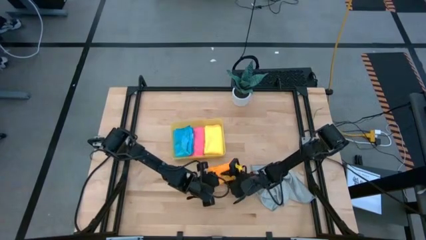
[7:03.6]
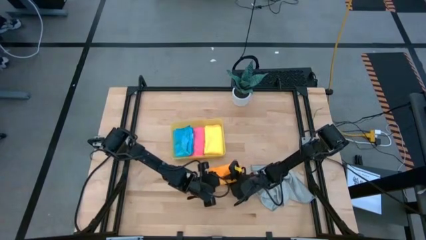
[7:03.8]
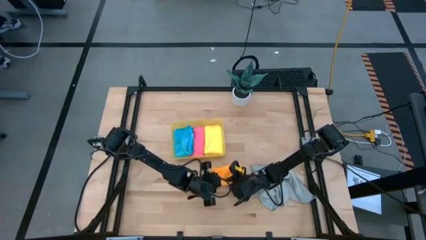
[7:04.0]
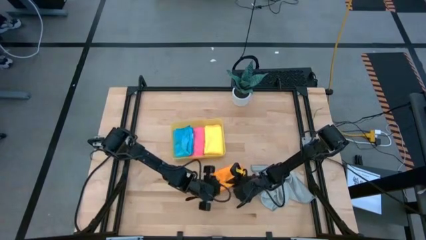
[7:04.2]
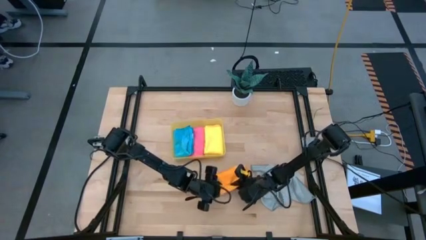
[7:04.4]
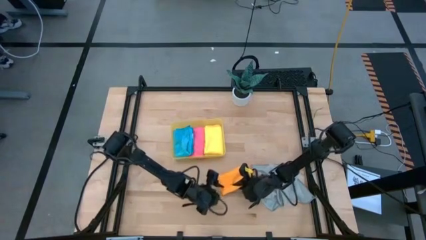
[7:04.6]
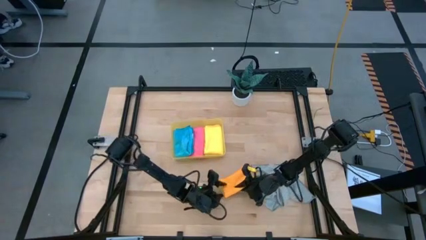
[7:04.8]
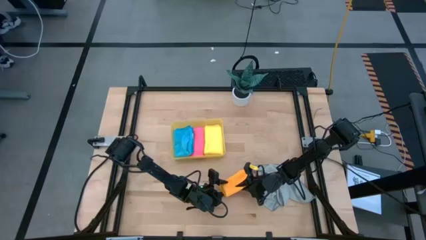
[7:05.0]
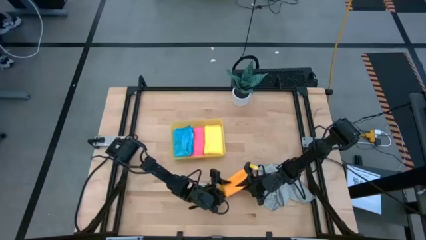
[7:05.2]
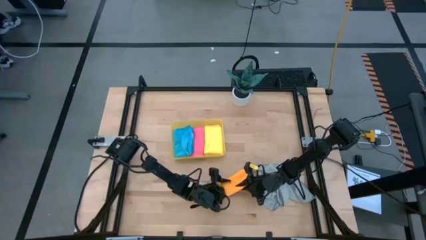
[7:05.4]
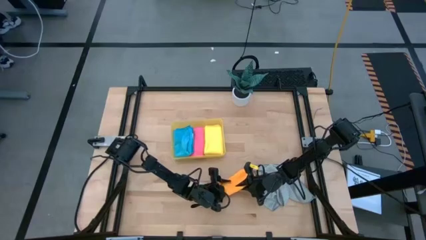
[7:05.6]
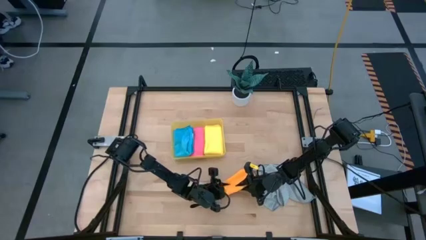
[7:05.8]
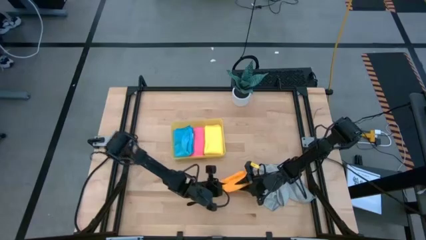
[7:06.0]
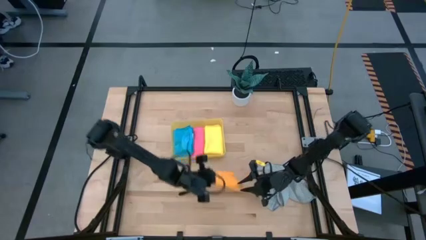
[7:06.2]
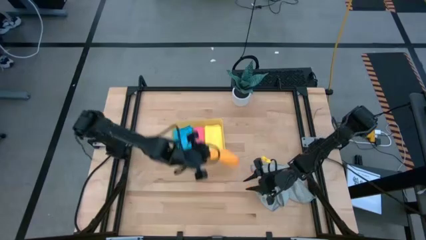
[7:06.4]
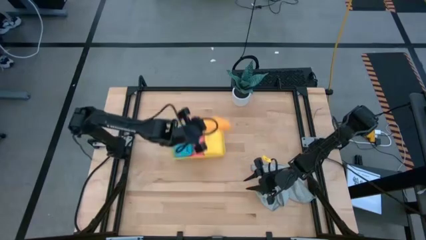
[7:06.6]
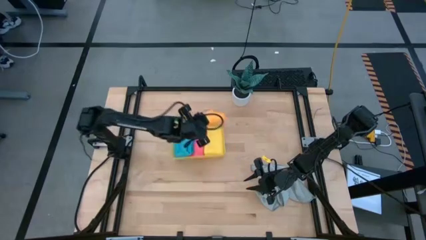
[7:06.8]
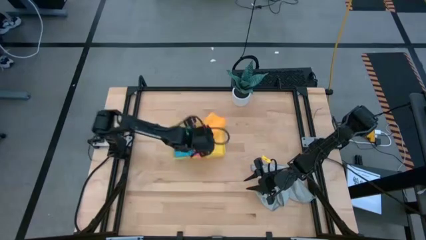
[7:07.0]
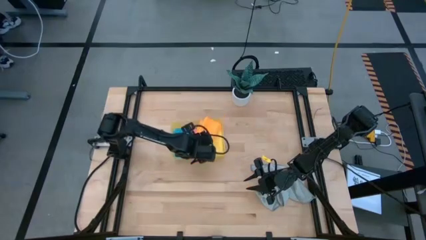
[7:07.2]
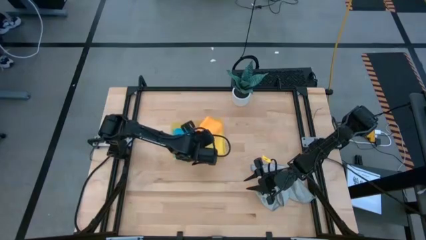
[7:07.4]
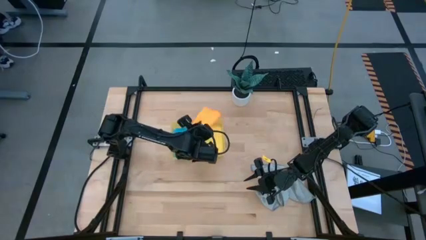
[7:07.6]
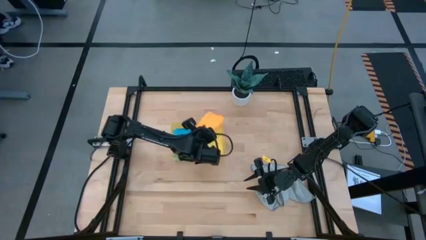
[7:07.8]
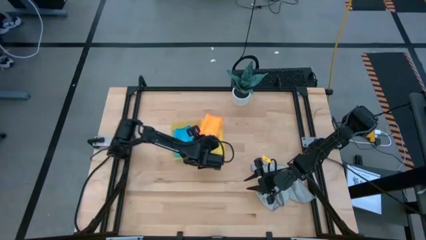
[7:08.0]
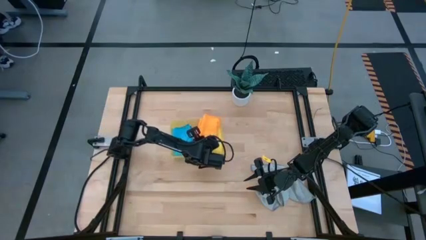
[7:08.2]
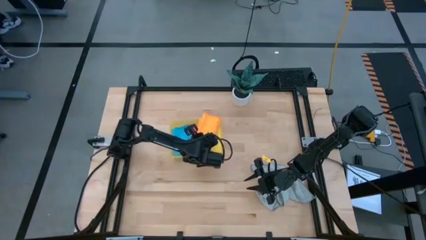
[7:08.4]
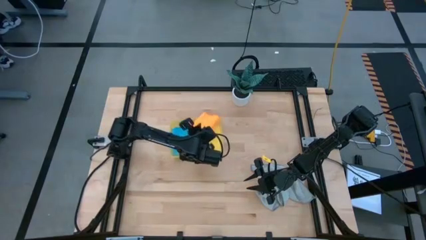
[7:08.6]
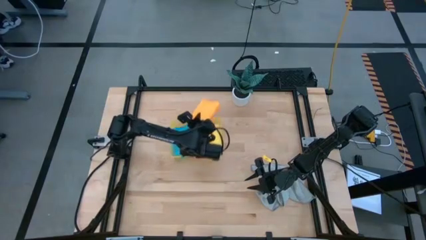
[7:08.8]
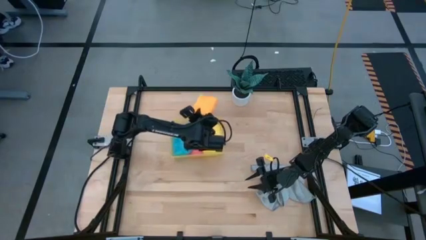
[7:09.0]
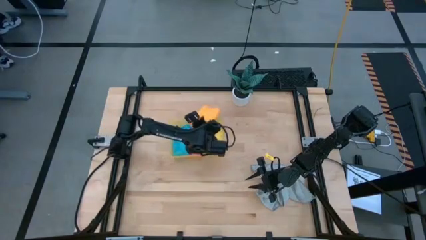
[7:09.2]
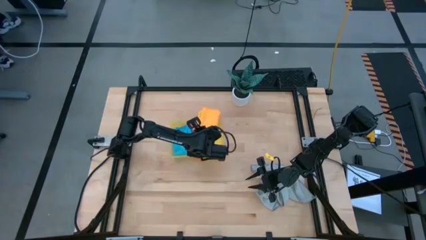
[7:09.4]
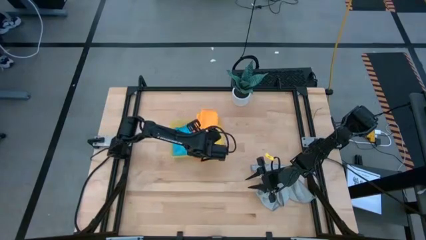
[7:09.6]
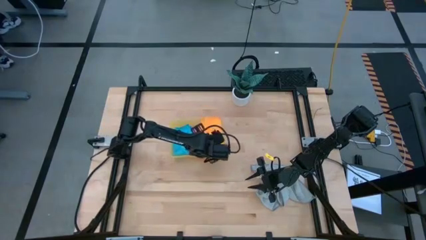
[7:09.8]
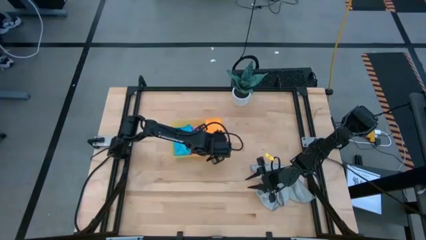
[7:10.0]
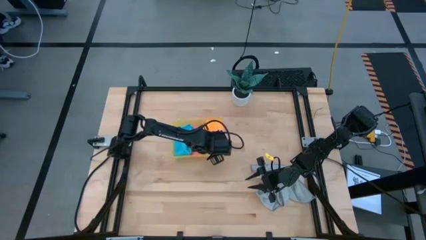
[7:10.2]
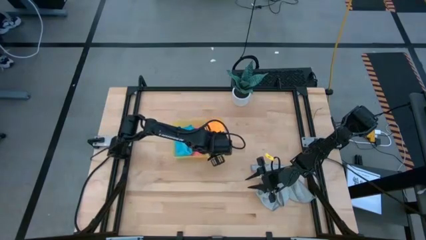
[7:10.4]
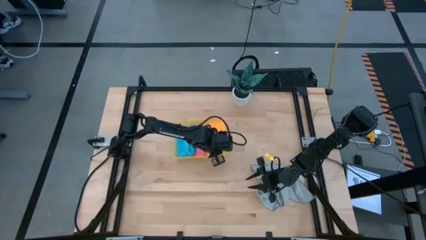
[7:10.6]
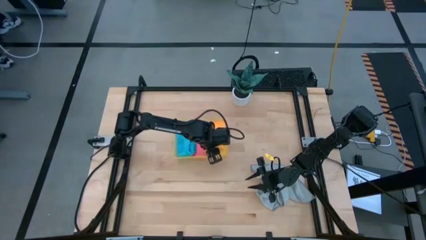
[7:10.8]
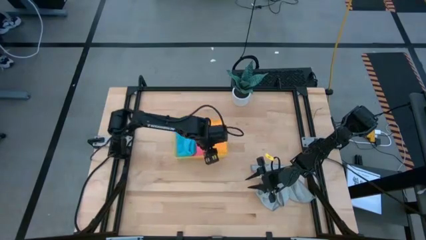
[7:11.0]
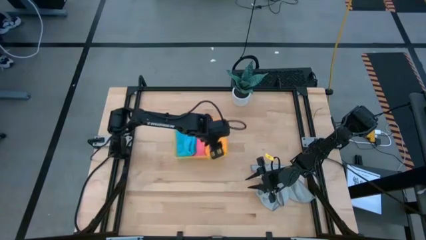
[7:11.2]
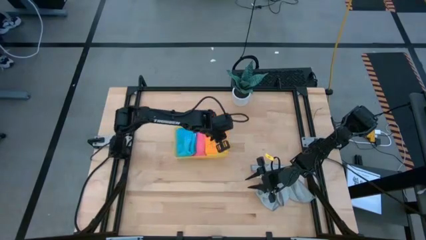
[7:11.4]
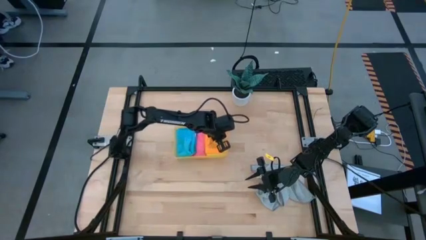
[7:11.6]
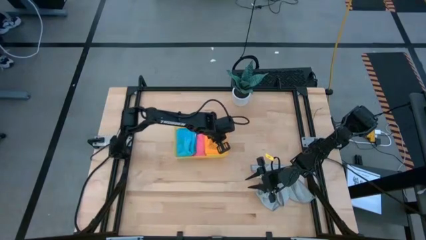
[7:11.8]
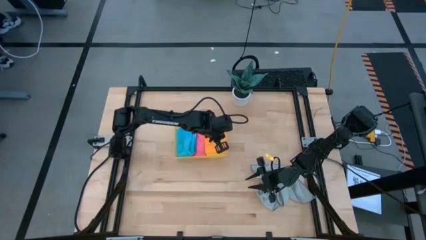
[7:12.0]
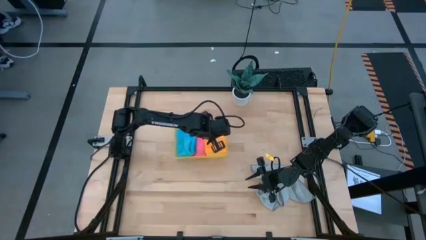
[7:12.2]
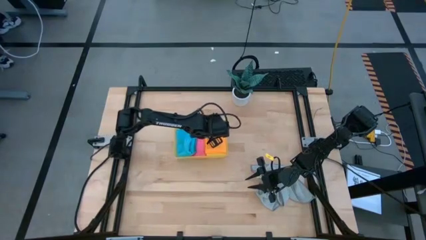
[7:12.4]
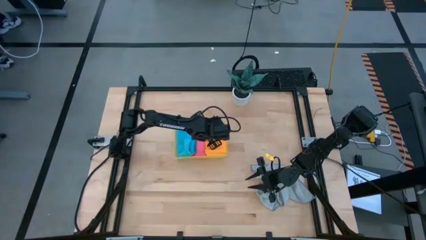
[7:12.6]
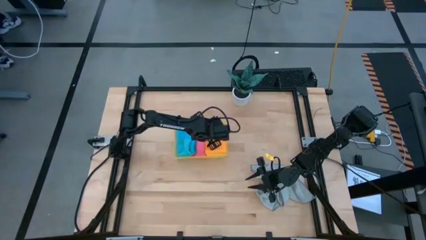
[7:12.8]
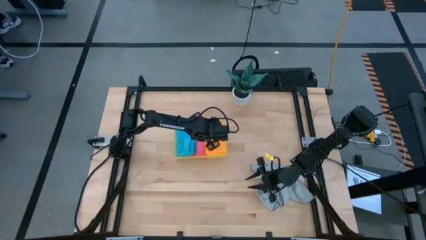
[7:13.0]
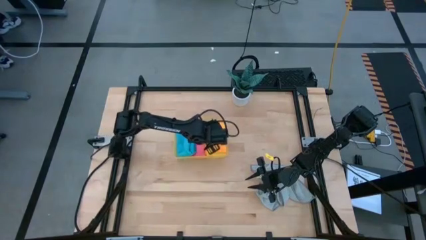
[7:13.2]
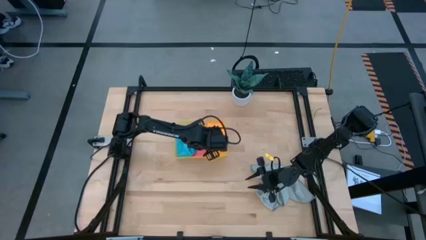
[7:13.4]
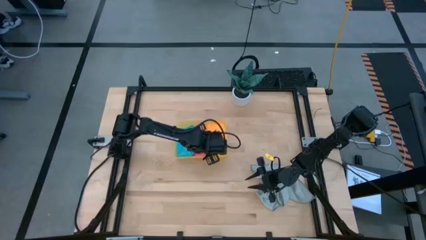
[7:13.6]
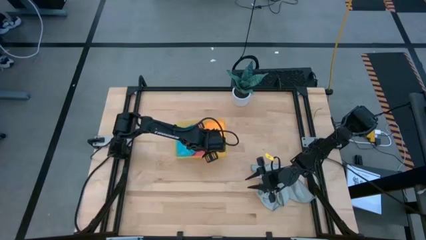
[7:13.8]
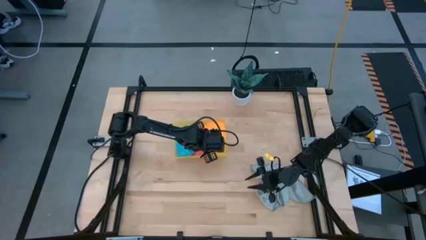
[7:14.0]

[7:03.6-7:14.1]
Task: Fold microfiber towels
Put the orange microfiber cloth into the yellow bin

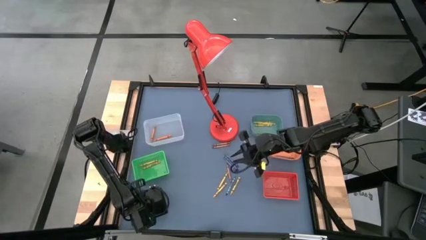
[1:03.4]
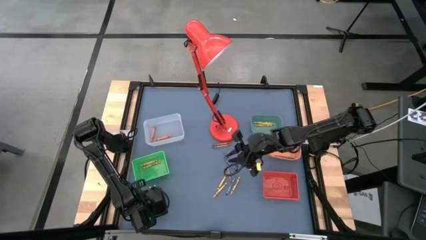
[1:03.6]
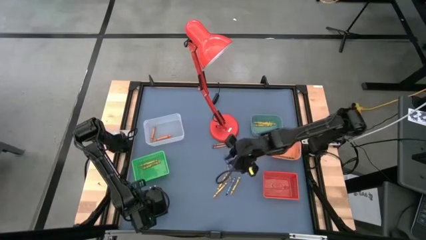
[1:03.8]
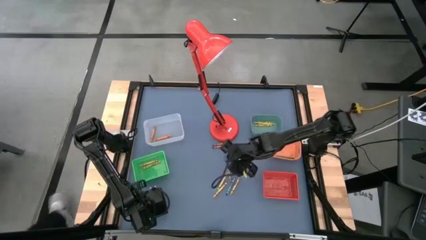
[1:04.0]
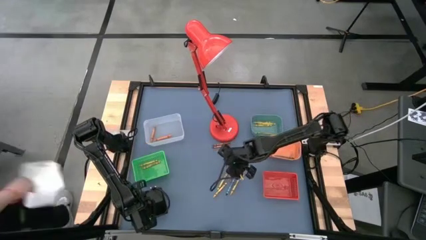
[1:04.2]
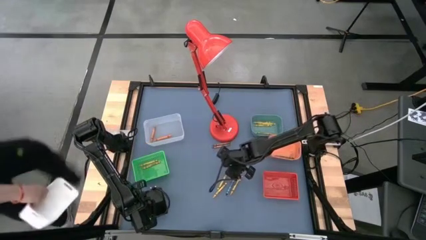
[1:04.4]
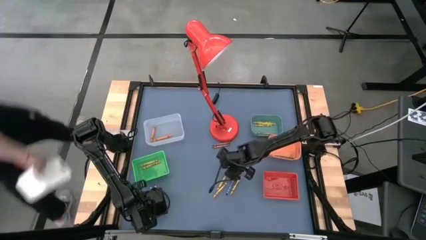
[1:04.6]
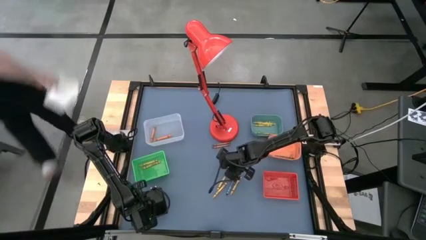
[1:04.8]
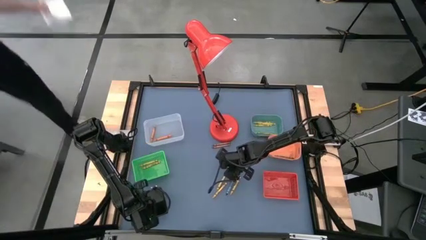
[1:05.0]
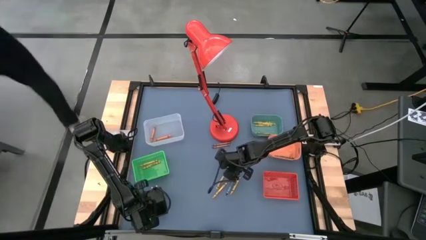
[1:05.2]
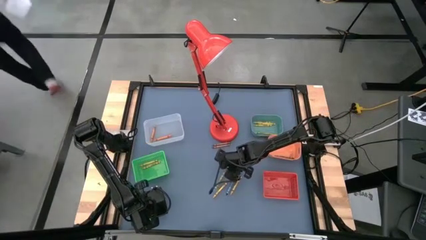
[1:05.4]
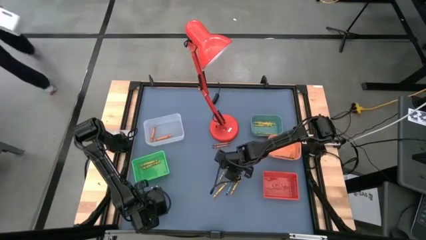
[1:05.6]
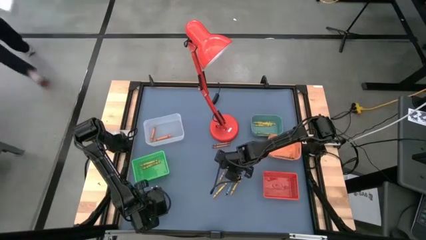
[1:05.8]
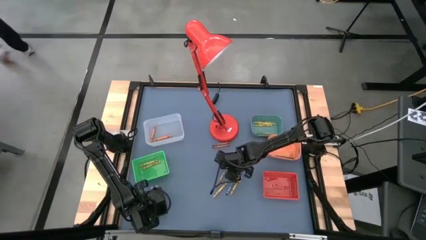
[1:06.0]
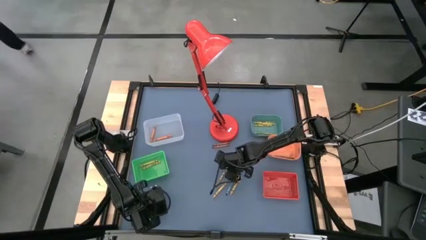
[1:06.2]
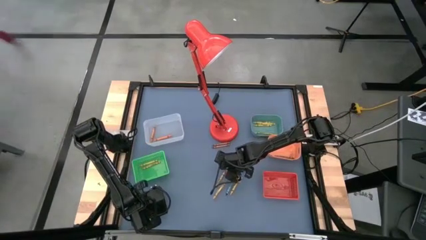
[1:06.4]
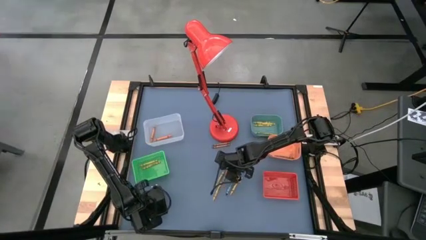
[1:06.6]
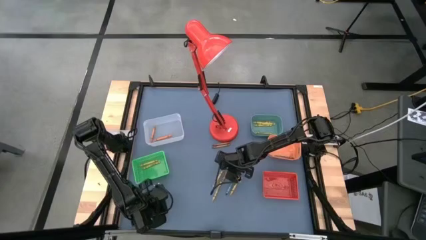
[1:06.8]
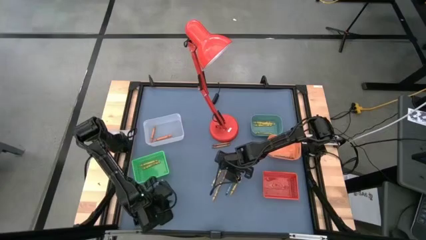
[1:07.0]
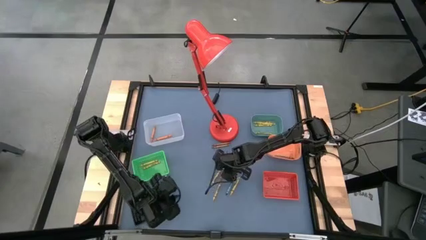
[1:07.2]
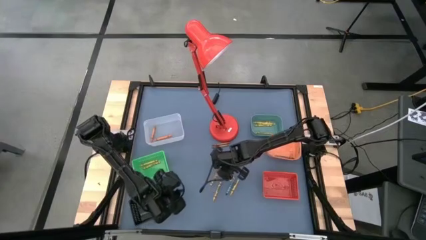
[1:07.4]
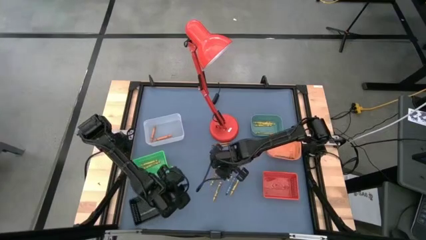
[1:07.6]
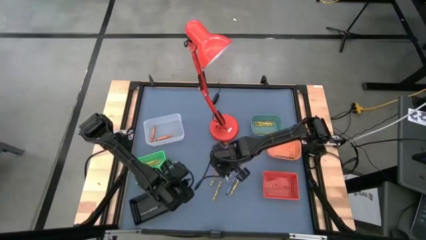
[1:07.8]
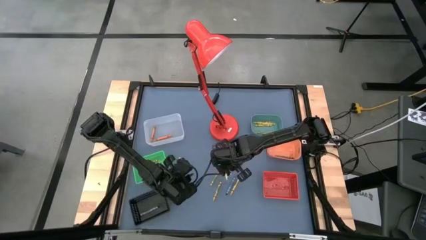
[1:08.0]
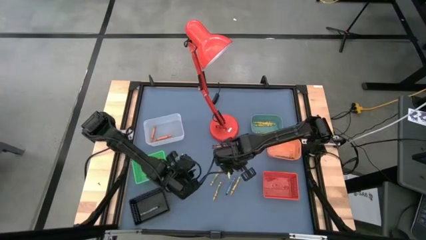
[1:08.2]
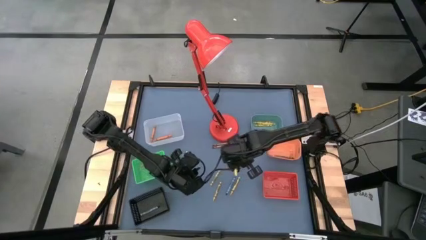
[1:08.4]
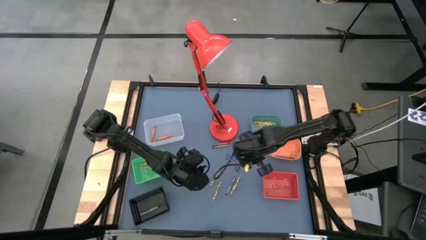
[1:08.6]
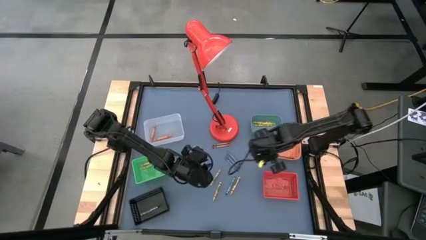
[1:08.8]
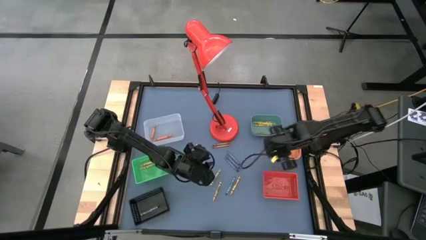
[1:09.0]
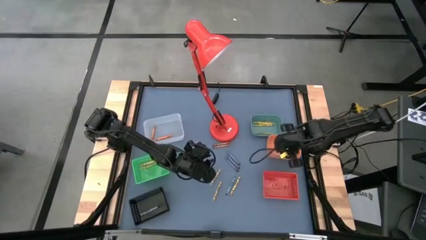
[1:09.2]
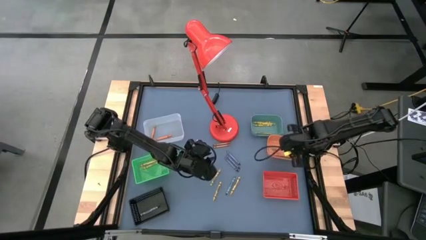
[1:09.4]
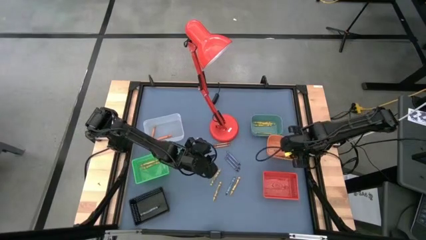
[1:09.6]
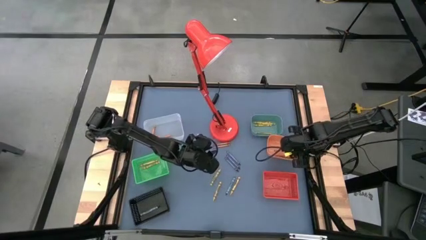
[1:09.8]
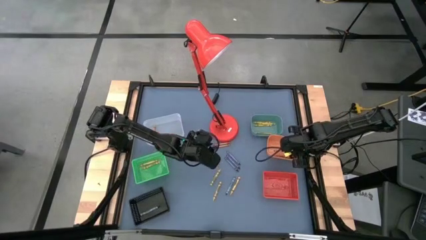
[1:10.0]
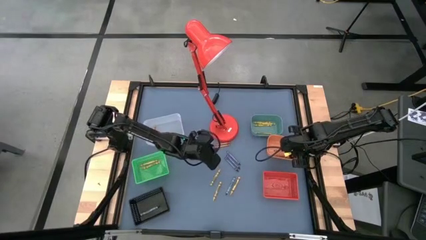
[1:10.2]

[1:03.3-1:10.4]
Task: Sort crayons
Put the brown crayon into the orange bin
